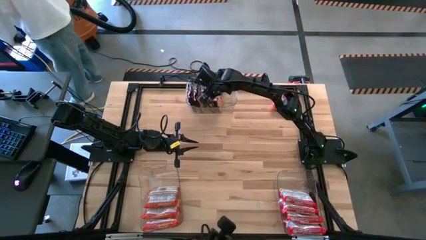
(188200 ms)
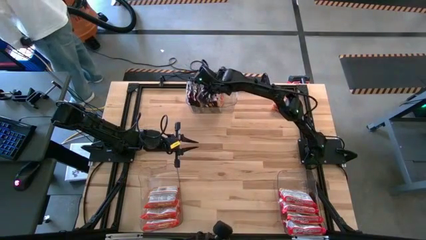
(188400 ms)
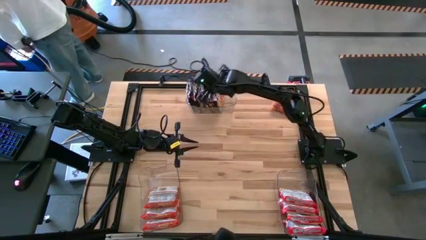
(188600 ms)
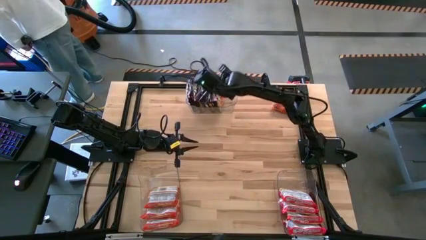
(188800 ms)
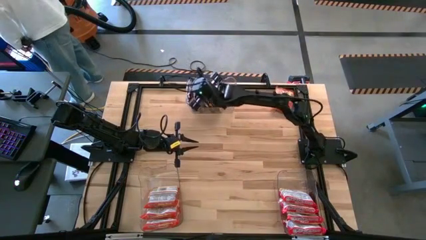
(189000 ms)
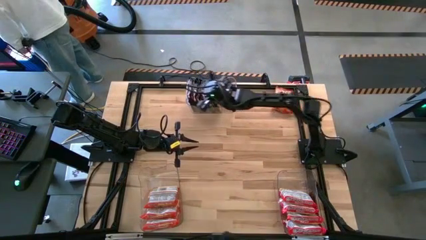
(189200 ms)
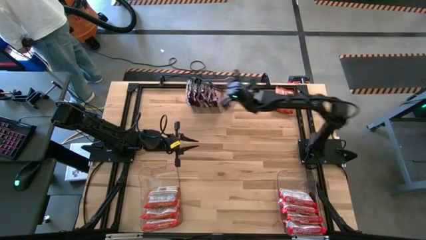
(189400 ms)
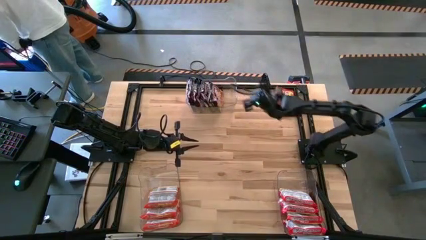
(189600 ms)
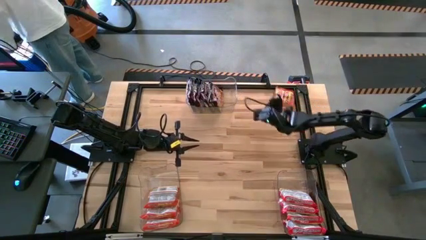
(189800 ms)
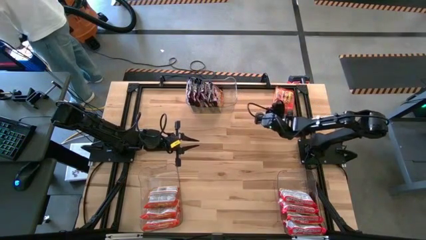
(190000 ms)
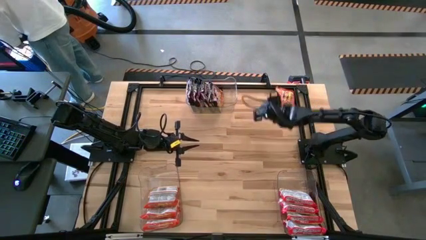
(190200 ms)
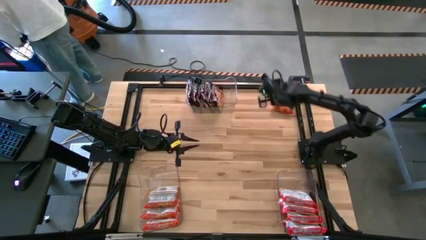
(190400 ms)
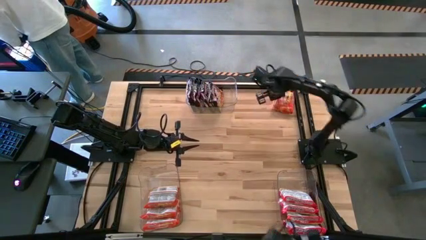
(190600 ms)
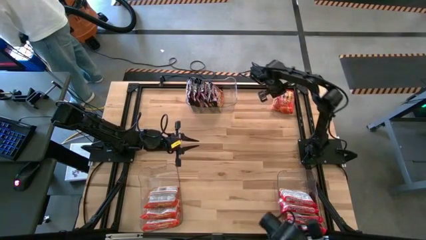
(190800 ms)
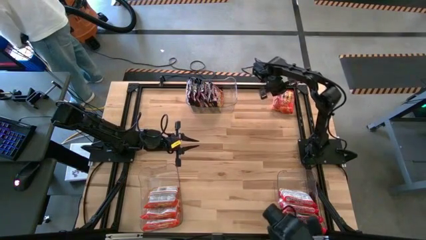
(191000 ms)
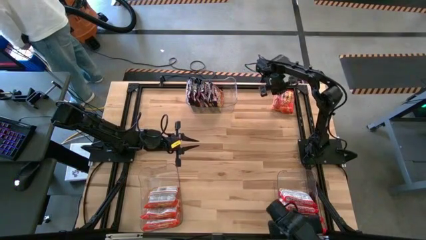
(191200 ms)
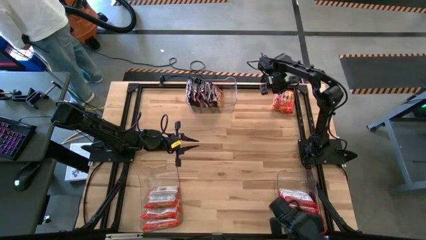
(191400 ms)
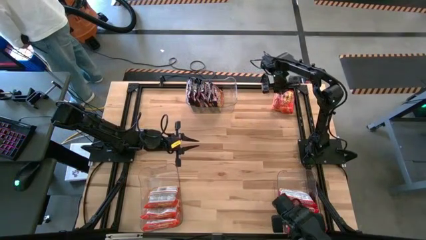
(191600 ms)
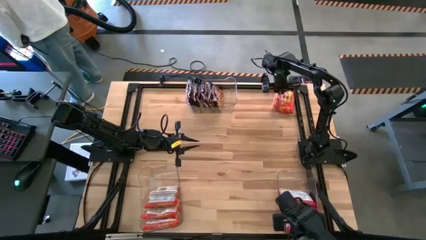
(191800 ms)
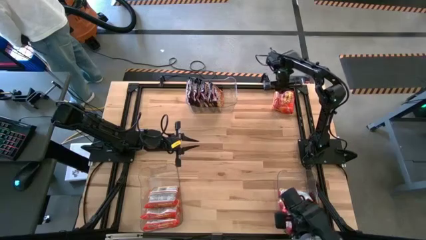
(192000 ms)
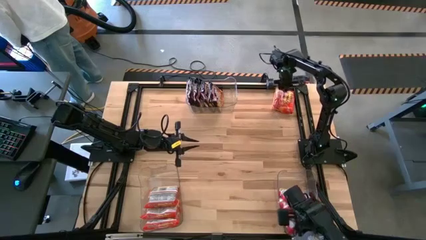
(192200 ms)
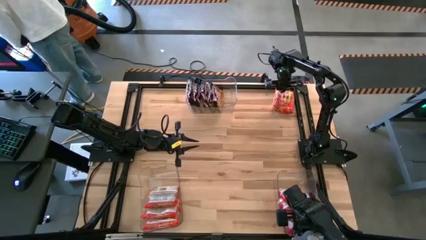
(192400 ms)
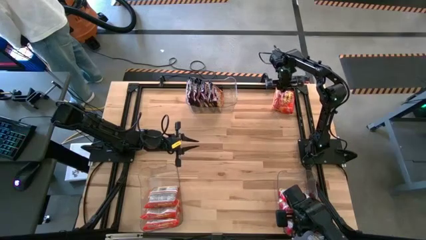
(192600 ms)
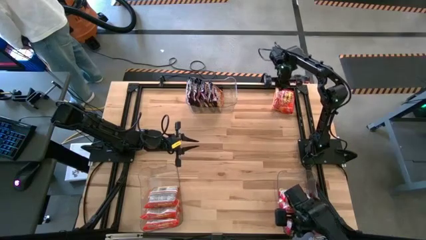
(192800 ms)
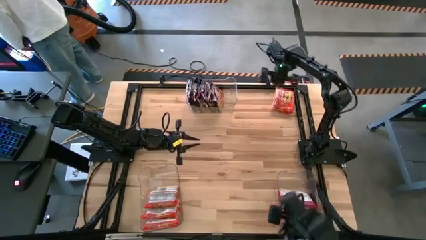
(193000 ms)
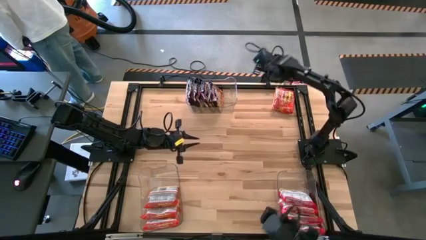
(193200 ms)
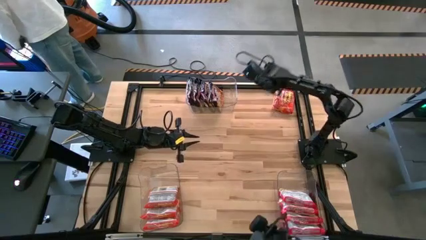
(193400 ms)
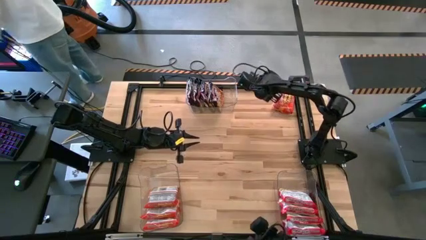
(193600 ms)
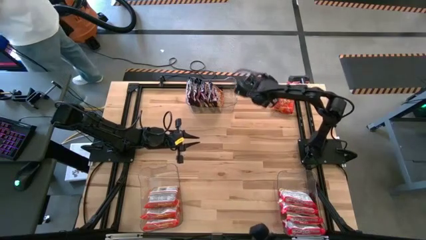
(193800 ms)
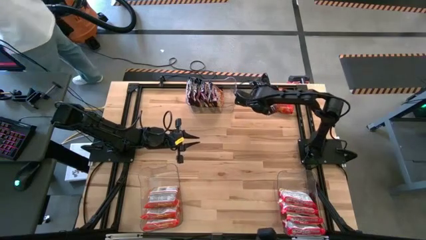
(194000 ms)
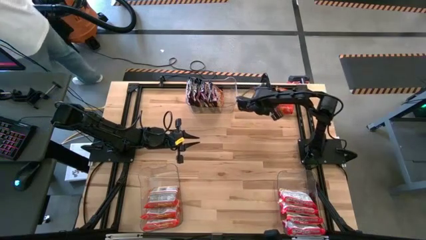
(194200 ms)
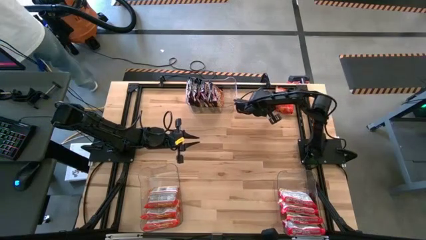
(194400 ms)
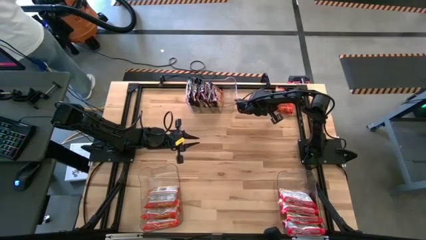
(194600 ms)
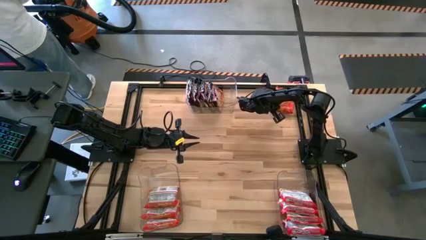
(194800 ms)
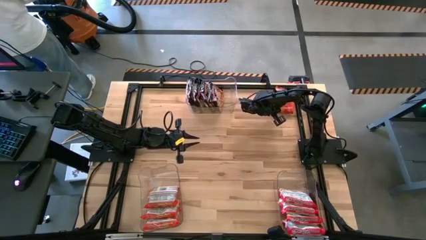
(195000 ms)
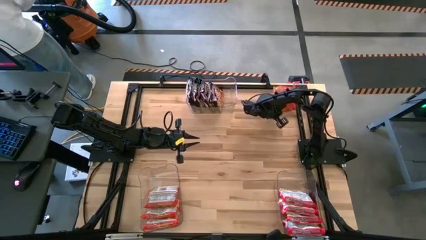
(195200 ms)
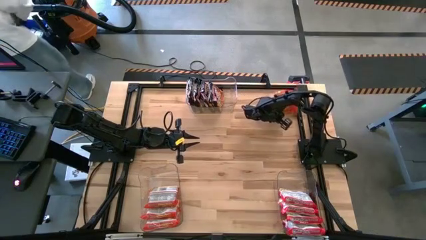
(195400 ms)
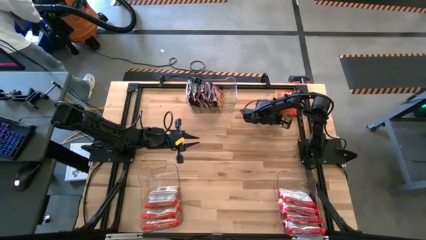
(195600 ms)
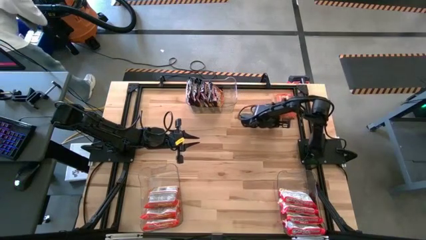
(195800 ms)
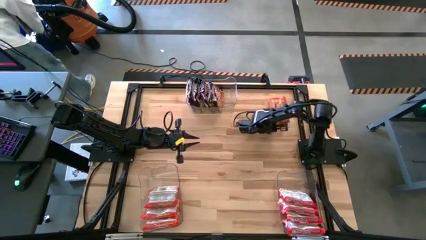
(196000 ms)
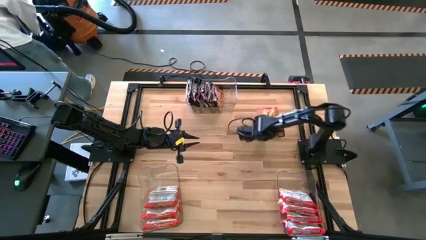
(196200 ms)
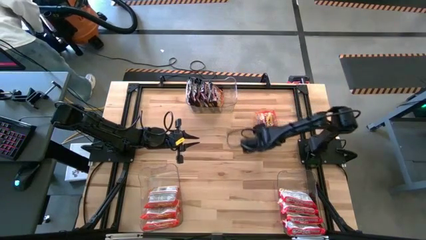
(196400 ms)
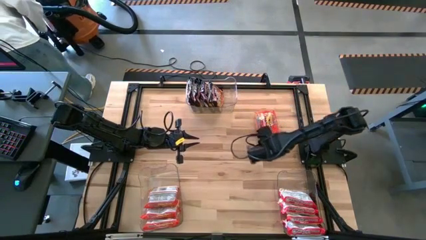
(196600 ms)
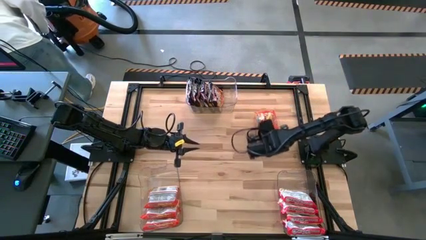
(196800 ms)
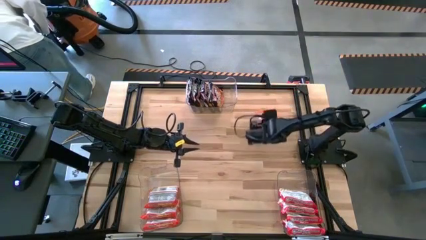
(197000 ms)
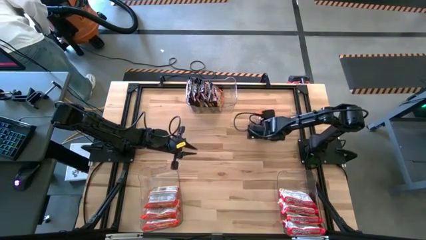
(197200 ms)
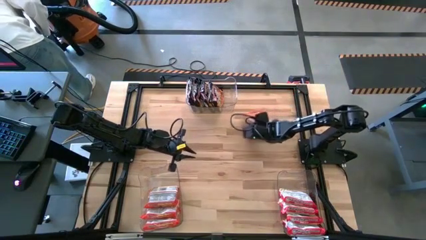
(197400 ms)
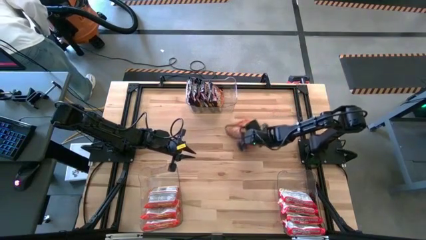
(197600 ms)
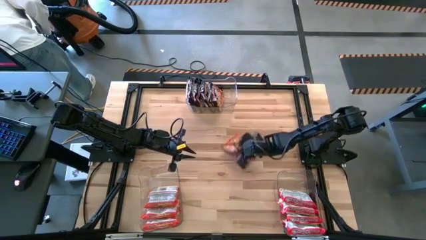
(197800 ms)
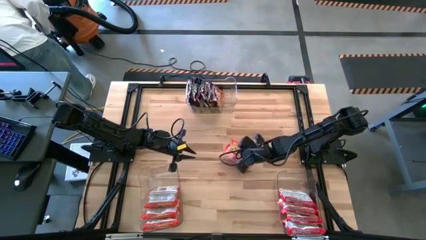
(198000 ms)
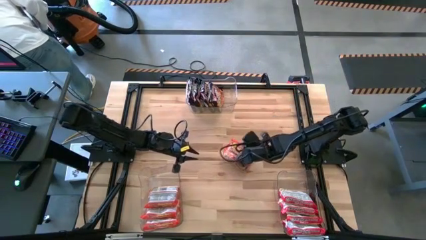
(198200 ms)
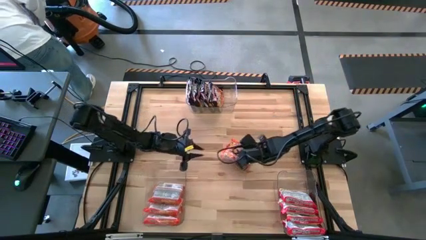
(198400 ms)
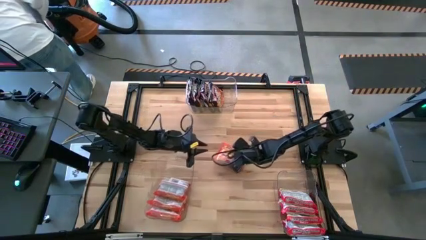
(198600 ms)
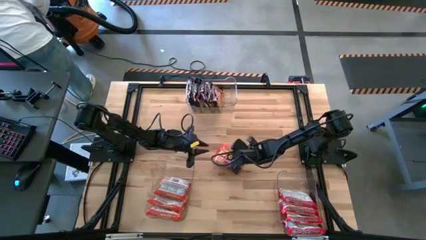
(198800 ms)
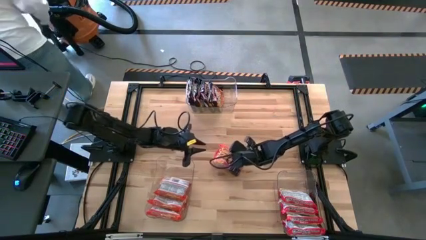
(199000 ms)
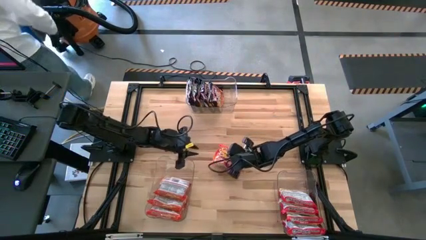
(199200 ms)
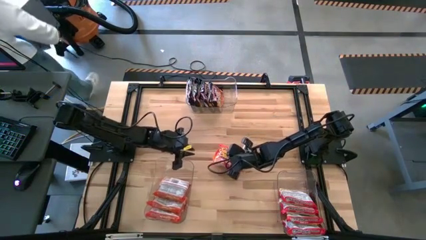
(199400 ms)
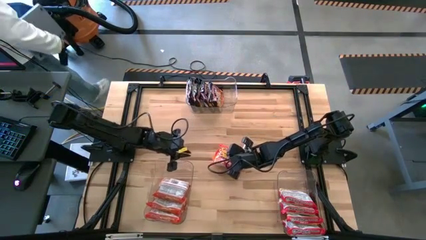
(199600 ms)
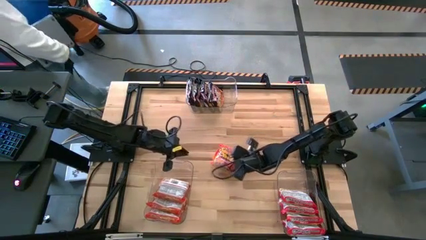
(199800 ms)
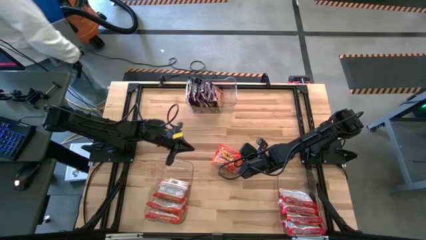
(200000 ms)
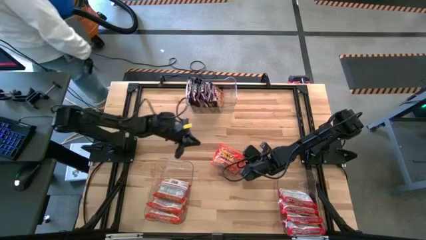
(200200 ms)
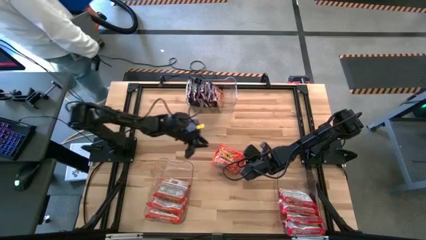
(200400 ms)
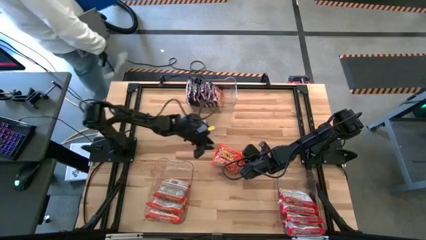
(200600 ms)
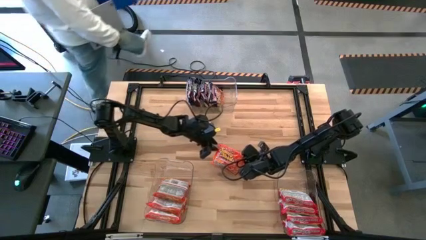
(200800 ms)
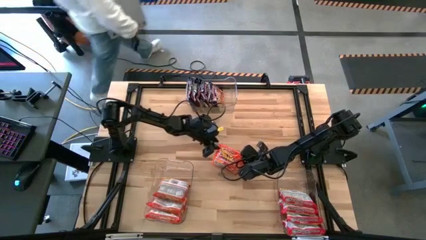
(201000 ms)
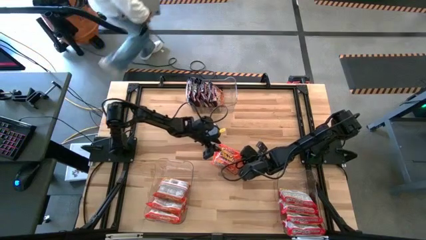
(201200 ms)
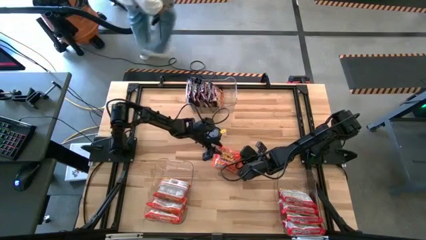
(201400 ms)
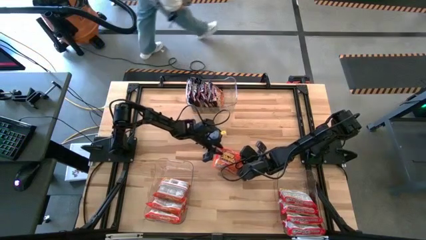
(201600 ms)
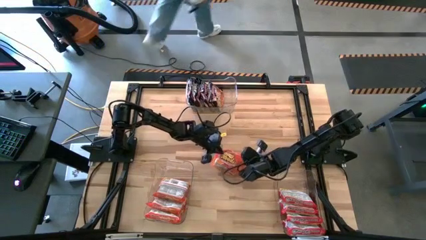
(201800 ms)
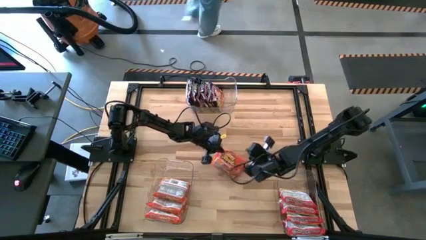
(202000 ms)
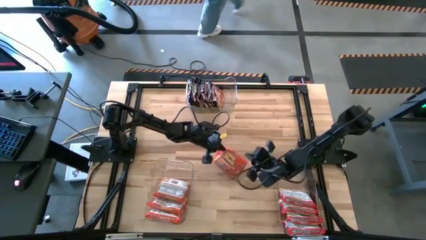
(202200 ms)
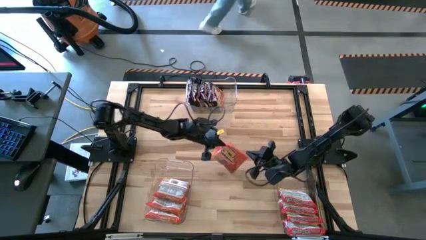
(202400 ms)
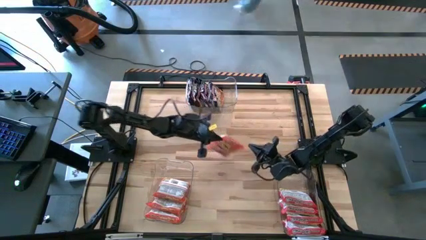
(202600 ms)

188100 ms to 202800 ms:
Task: Sort Maruchan noodles
Put the orange noodle pack into the bottom left transparent bin

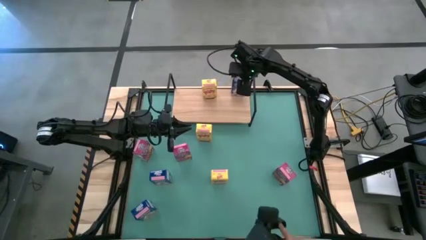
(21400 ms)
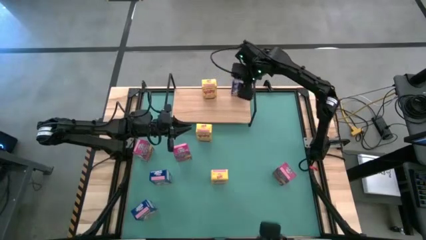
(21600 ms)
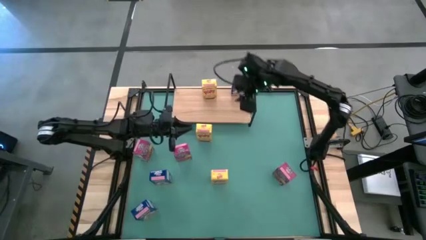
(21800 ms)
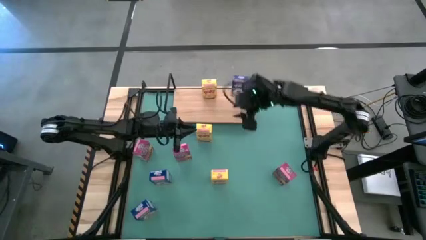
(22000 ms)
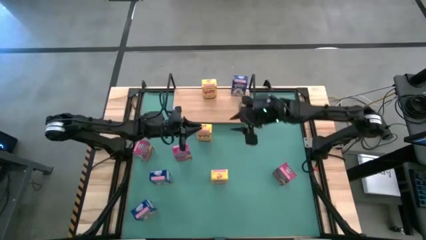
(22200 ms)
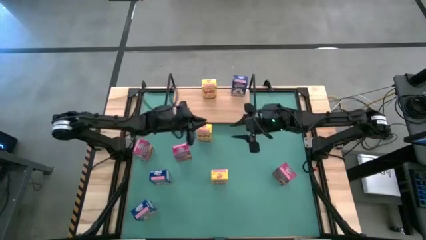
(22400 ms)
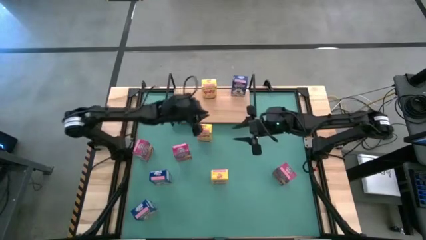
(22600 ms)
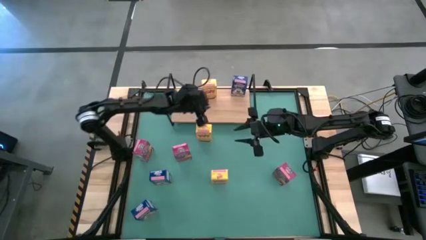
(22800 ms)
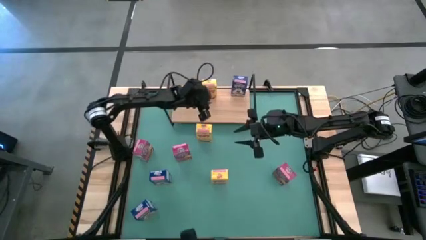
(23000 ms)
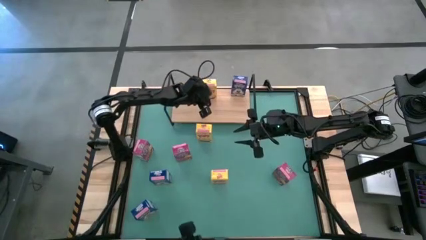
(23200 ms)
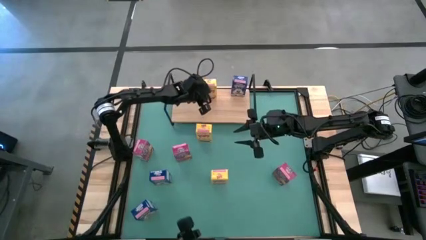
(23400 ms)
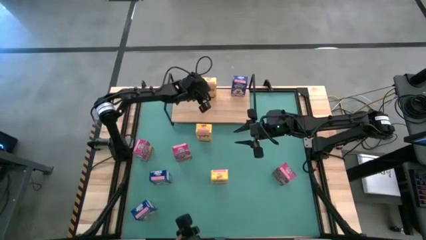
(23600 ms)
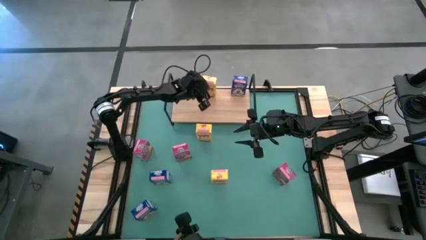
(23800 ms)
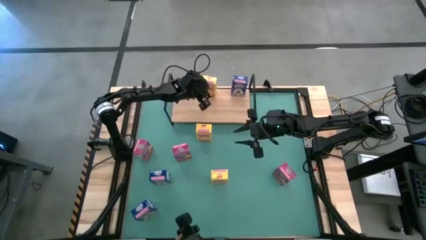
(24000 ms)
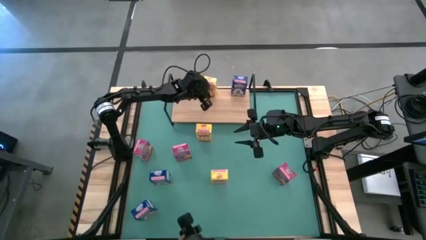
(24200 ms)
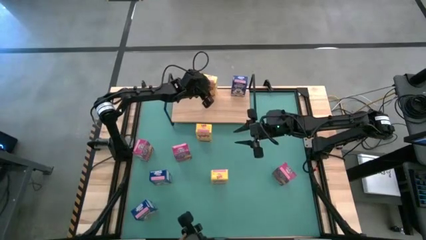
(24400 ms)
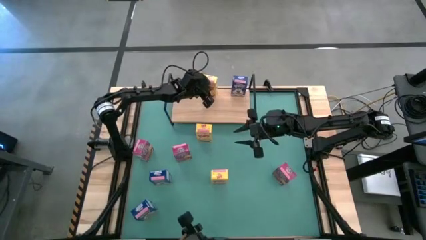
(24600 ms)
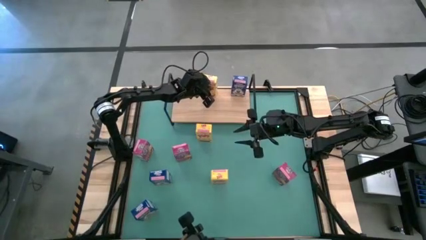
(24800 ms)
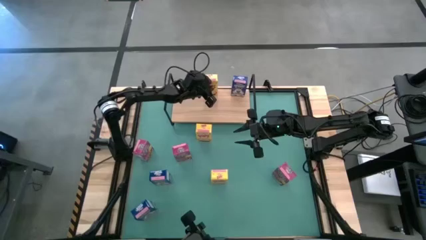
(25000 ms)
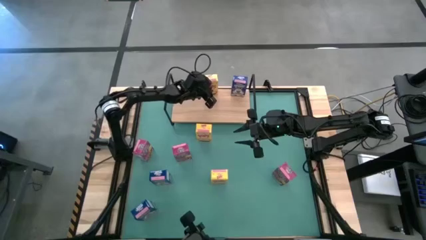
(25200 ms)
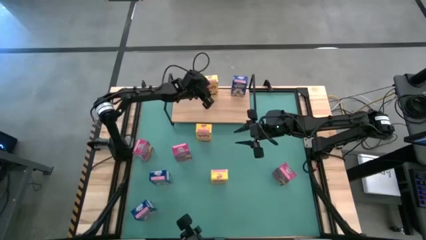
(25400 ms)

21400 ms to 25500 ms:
Task: Stack cereal on shelf
Adjust the yellow cereal box on the shelf
